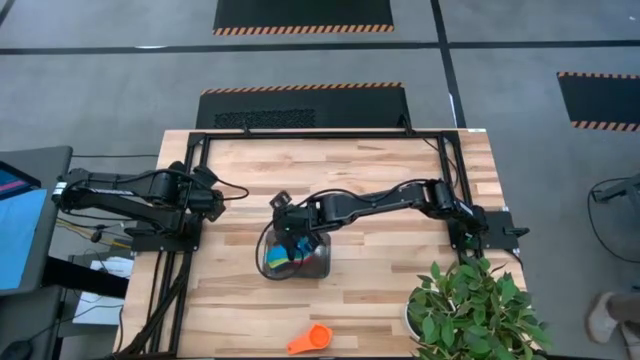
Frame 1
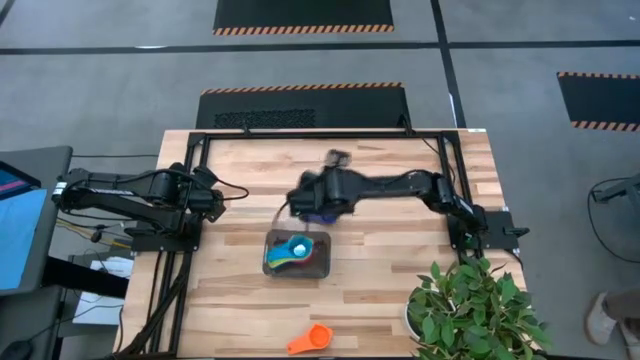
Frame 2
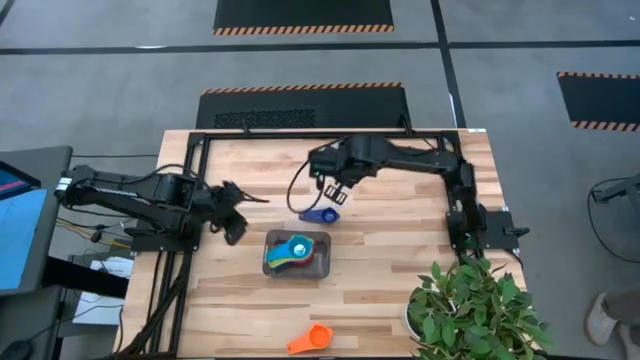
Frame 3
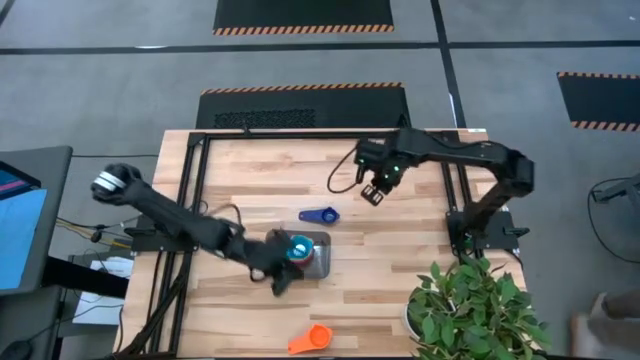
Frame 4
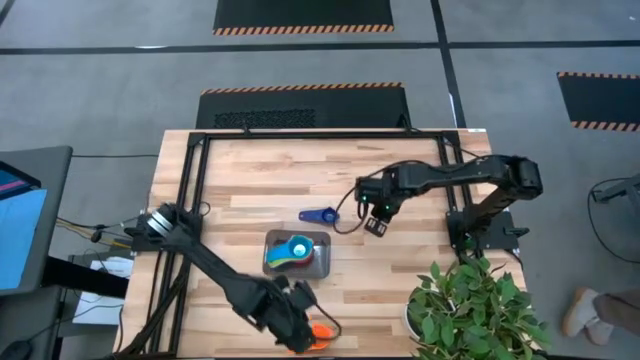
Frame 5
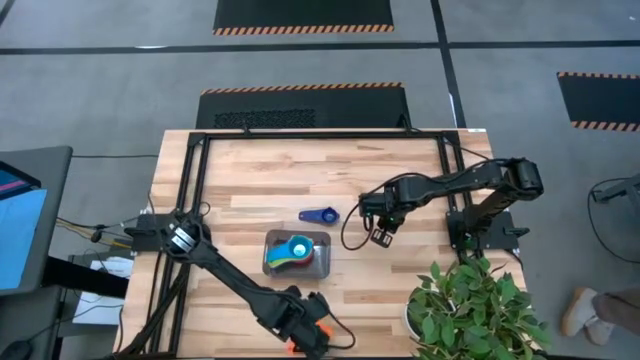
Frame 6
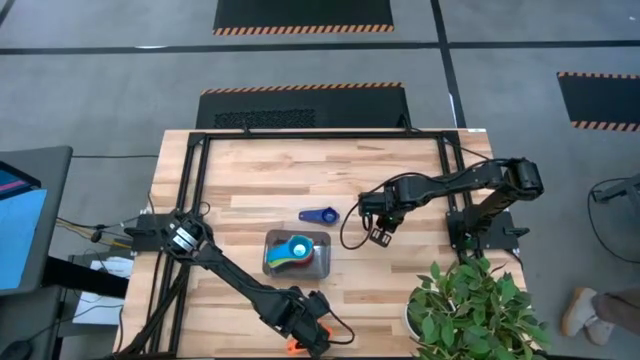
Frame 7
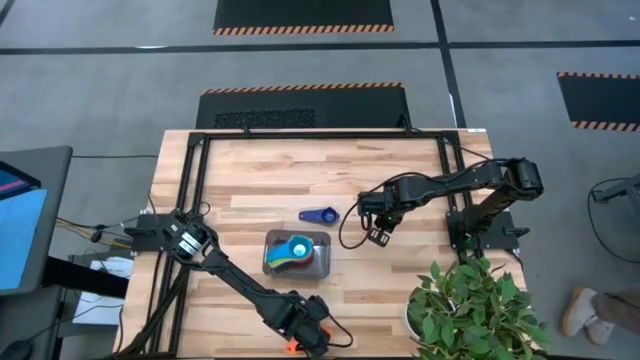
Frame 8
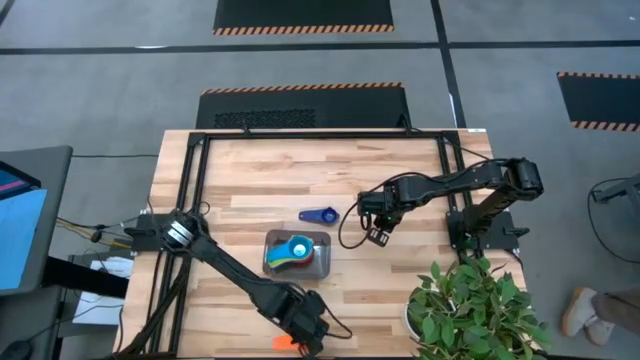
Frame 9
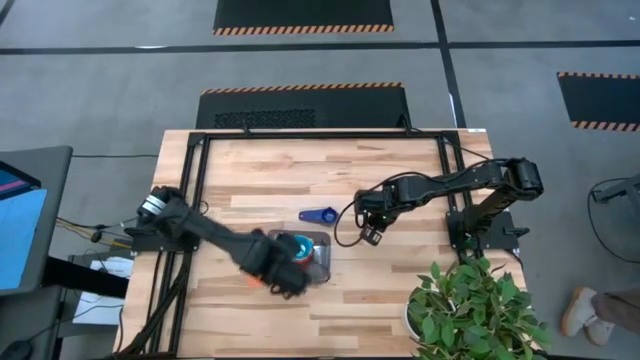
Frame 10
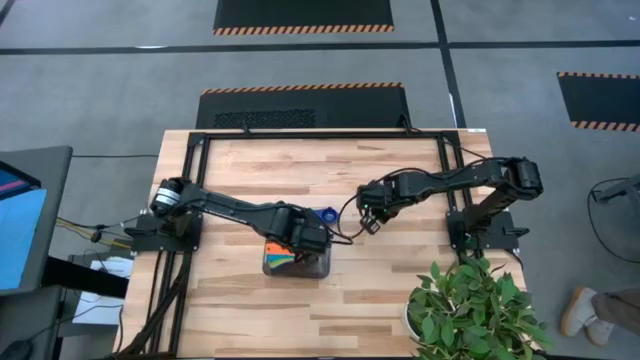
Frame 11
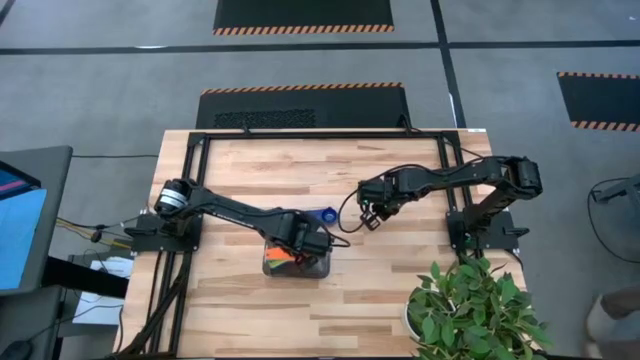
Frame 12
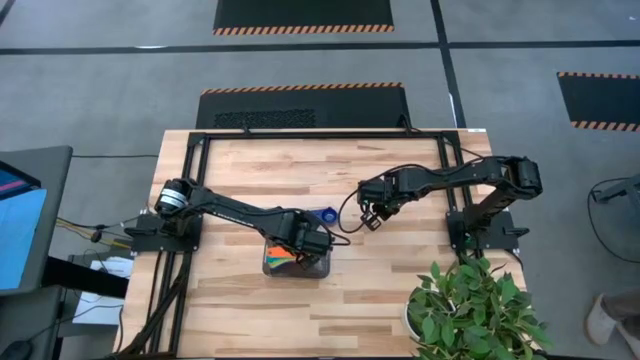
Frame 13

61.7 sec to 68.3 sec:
Task: Nest measuring cups in basket
Stack the orange measuring cup on top of the light blue measuring cup into the bin

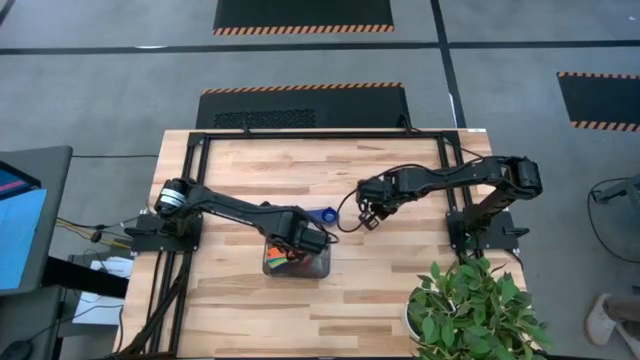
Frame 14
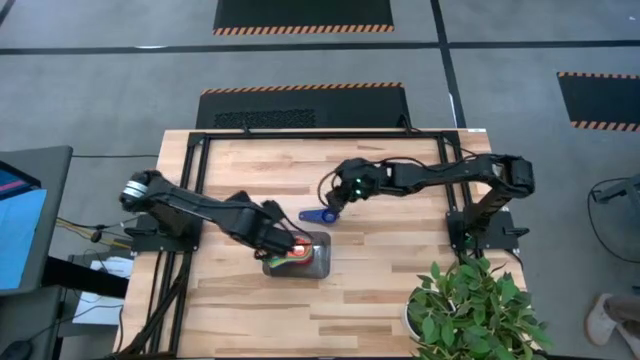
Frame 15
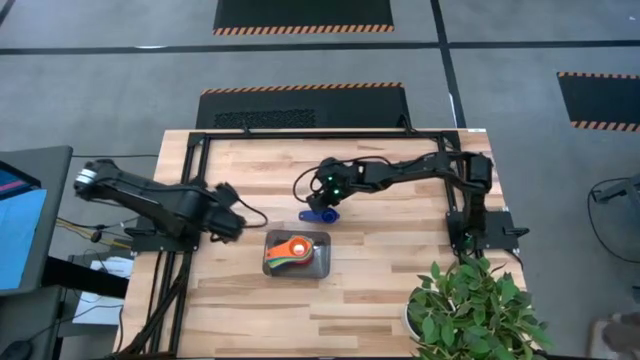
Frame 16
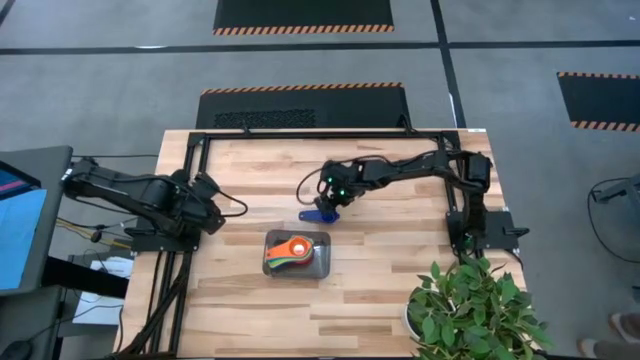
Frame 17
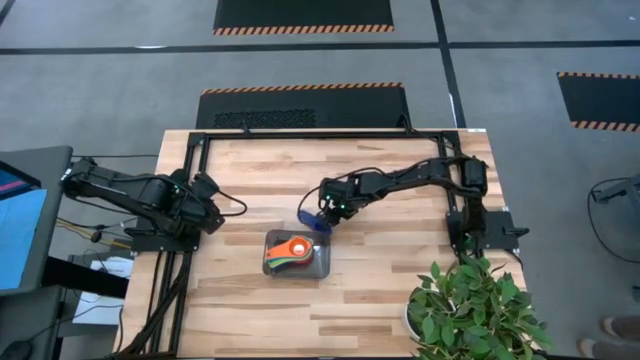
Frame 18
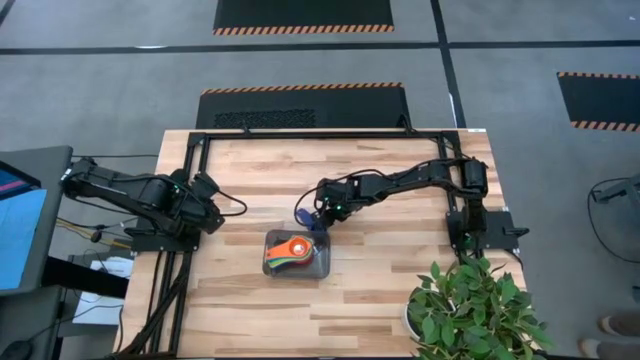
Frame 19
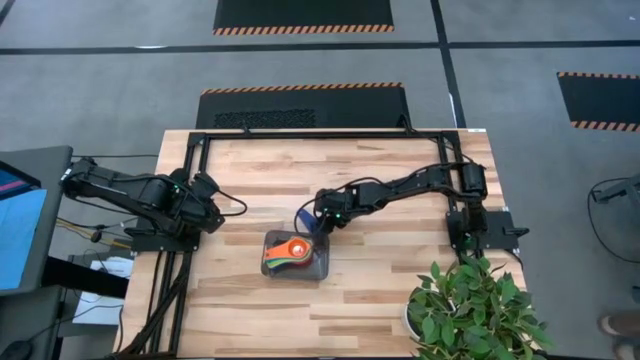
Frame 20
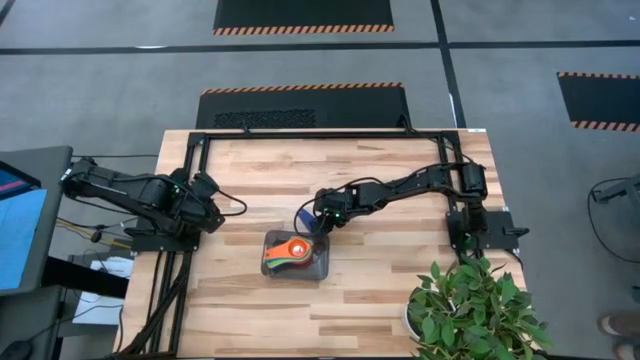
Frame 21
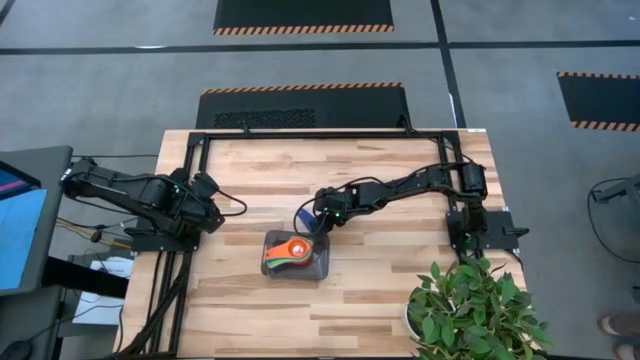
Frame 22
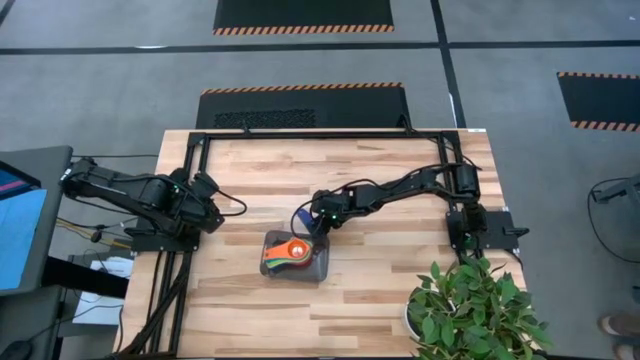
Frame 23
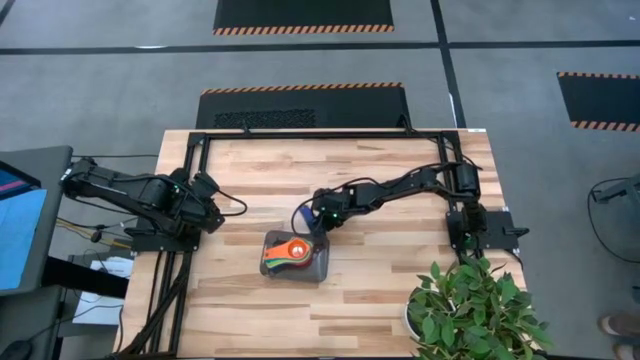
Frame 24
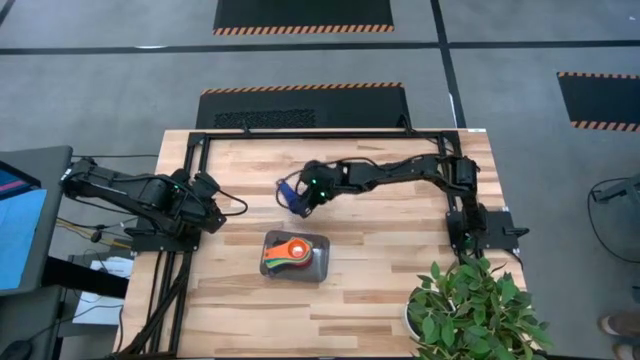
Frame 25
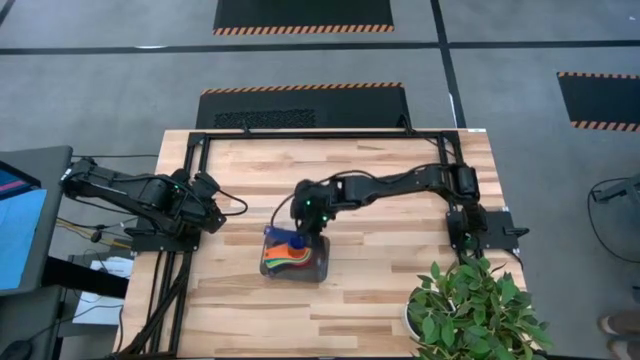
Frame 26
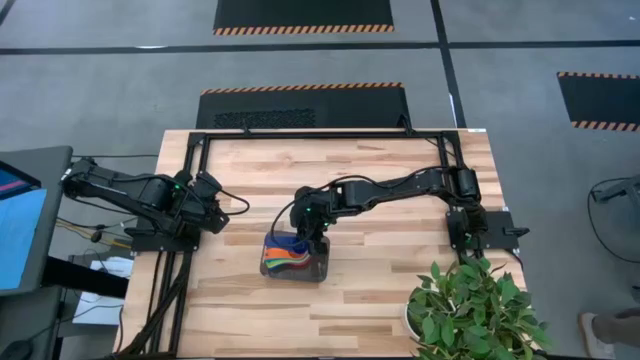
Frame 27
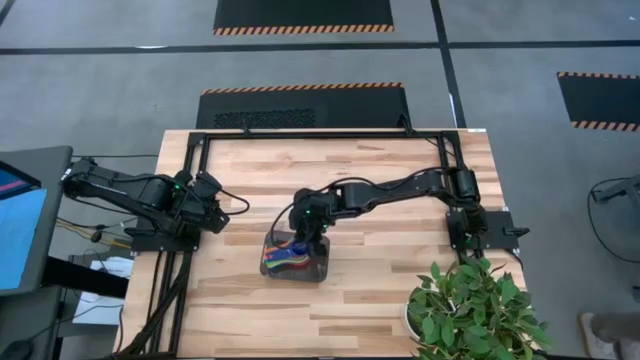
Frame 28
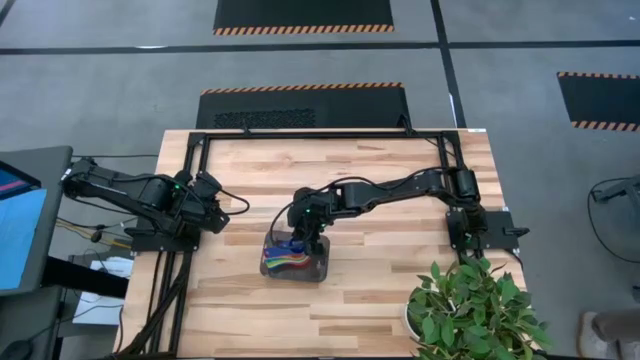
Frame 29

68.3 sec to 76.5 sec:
Stack the dark blue measuring cup on top of the orange measuring cup into the bin

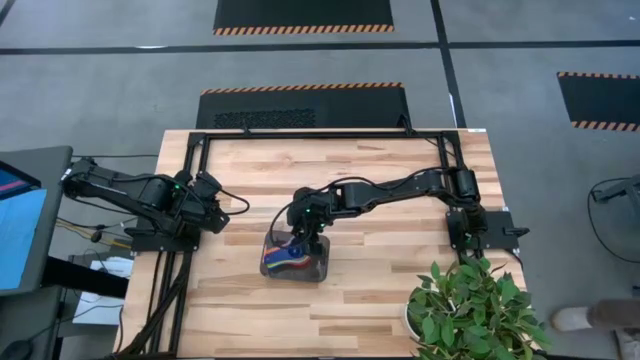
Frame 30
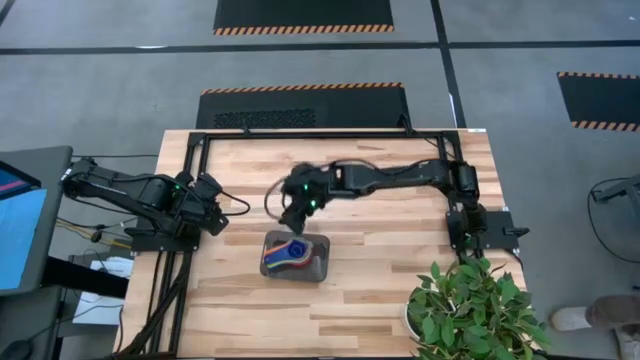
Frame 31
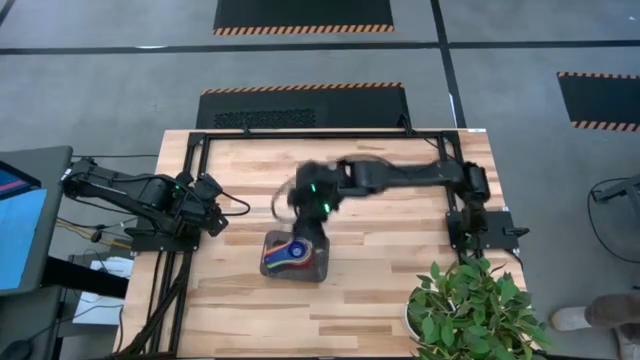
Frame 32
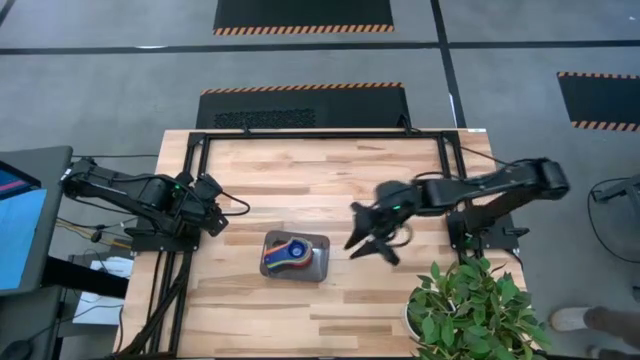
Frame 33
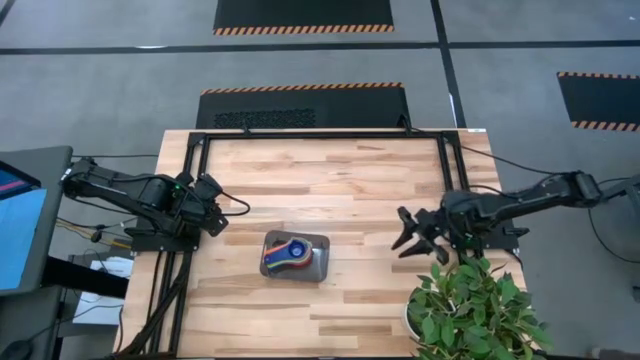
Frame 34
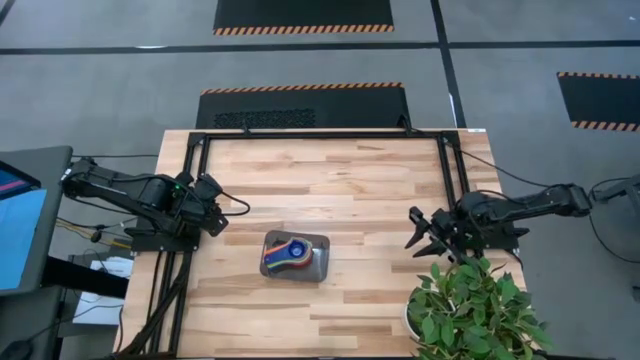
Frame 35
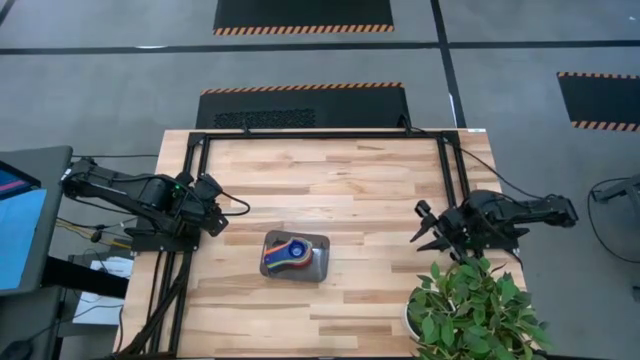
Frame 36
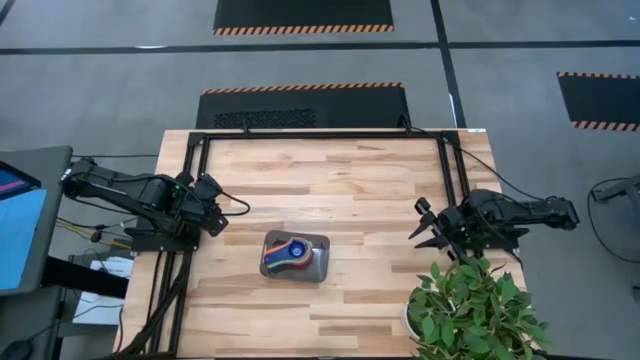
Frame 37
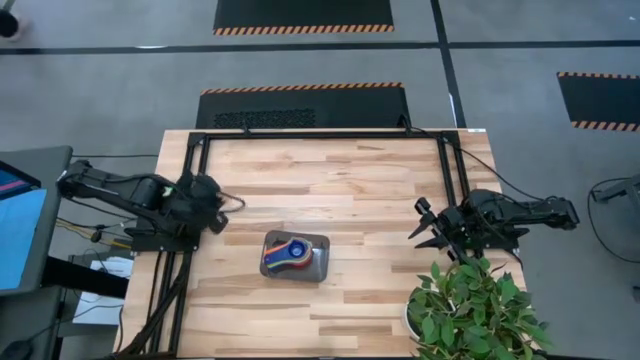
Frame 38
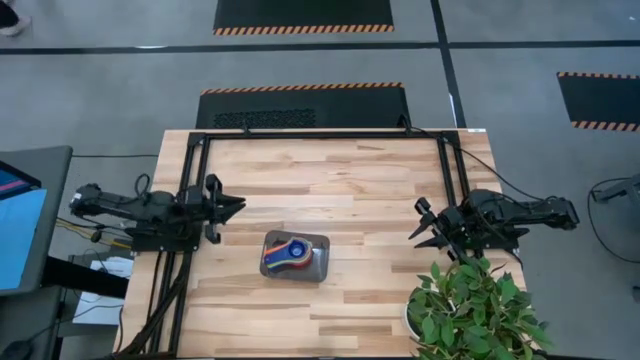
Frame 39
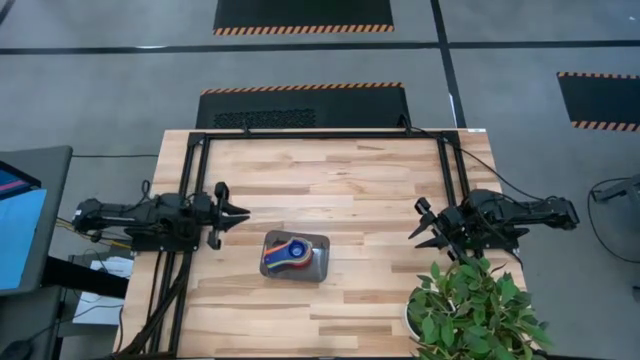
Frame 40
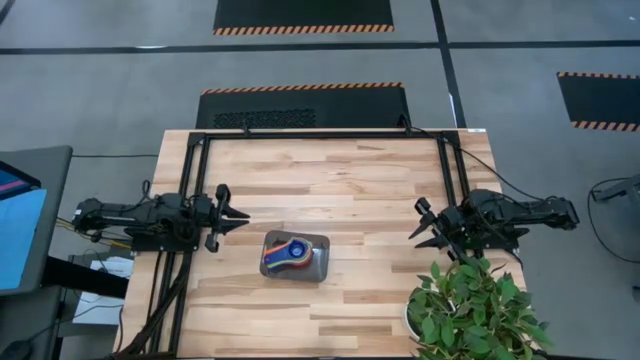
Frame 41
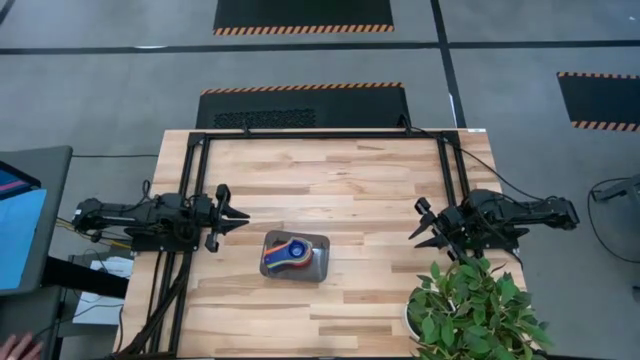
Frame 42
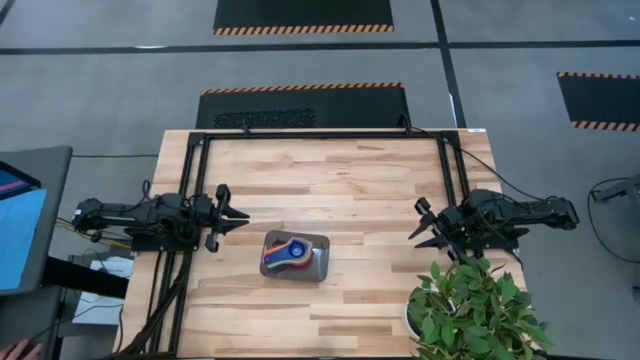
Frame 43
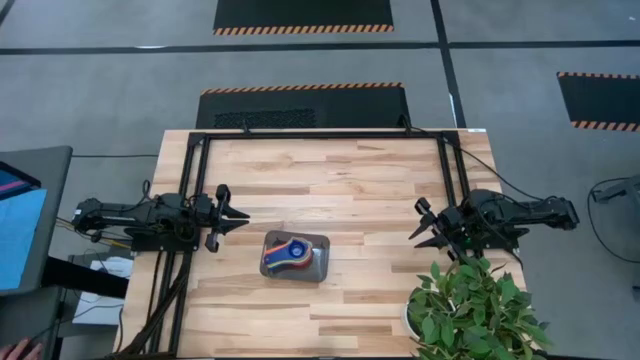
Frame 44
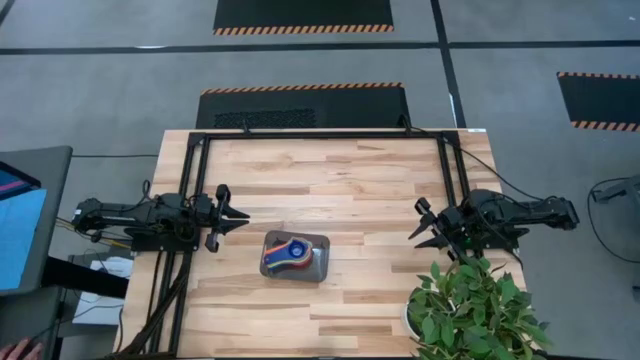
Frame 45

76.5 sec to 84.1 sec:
Return to Home Position
